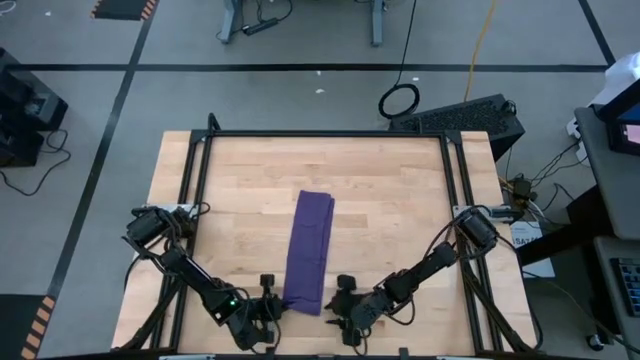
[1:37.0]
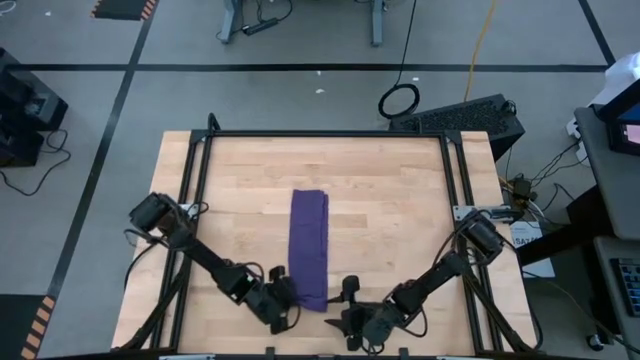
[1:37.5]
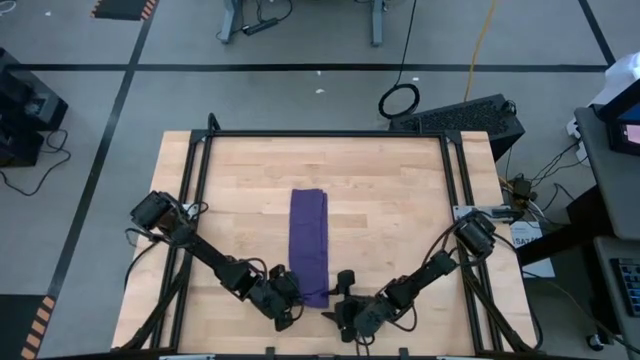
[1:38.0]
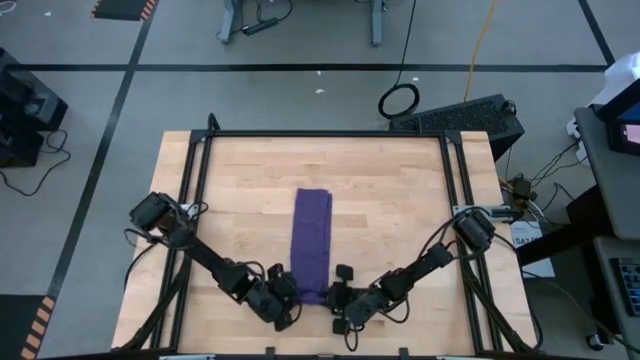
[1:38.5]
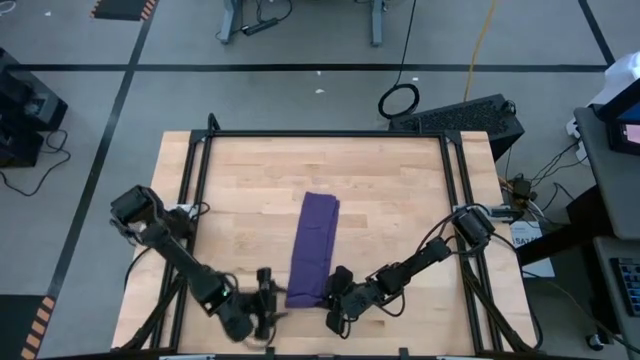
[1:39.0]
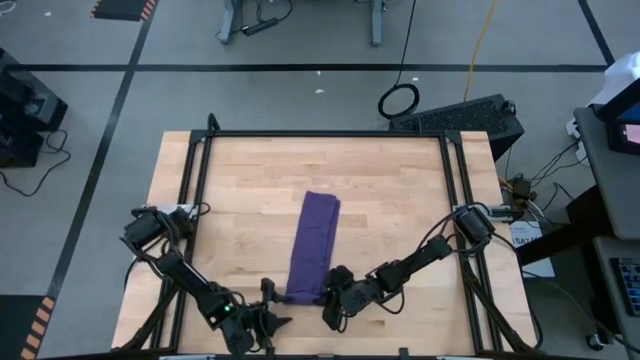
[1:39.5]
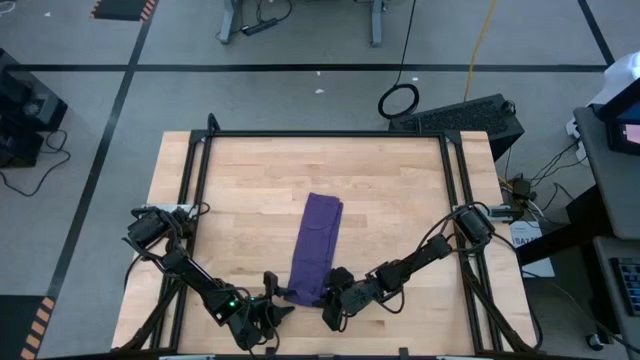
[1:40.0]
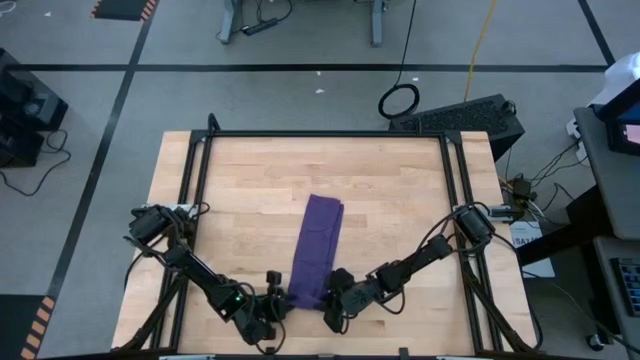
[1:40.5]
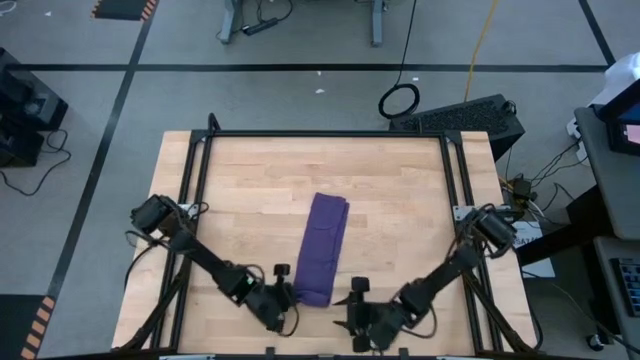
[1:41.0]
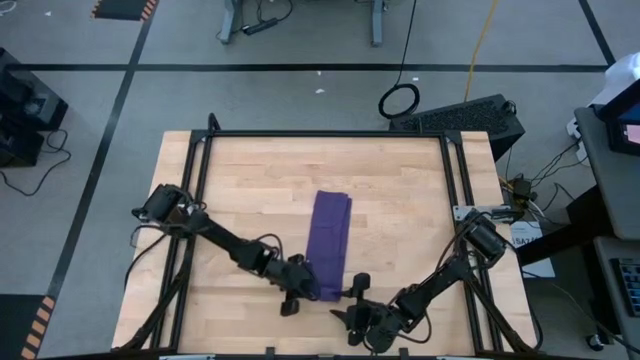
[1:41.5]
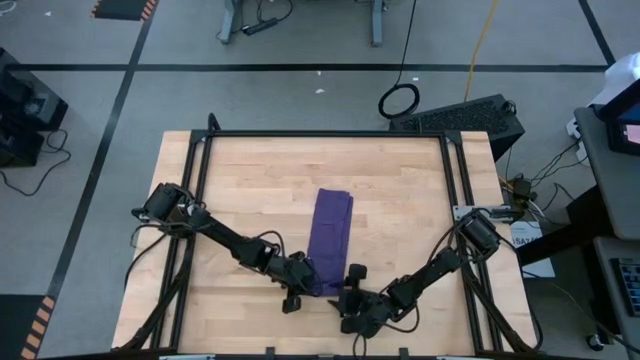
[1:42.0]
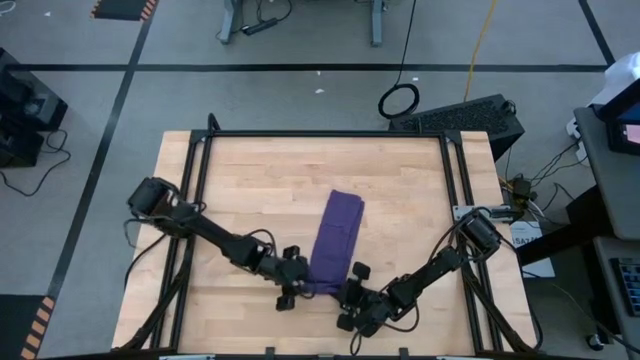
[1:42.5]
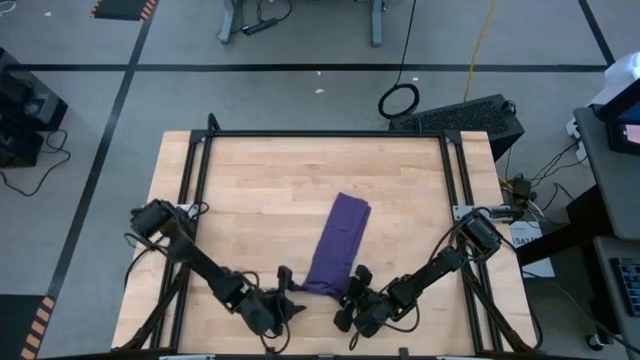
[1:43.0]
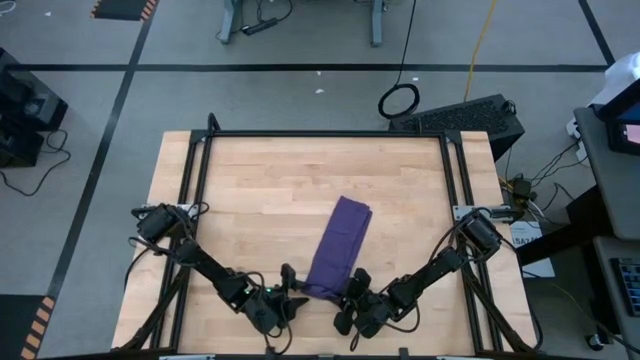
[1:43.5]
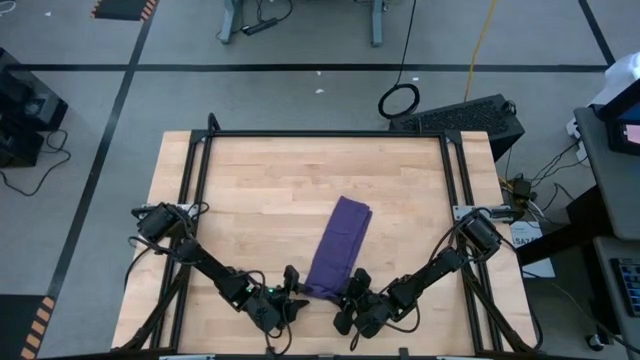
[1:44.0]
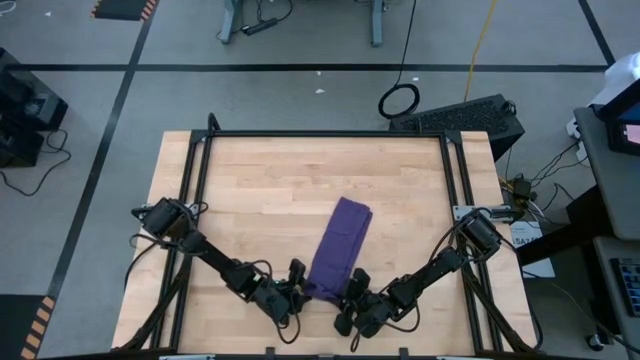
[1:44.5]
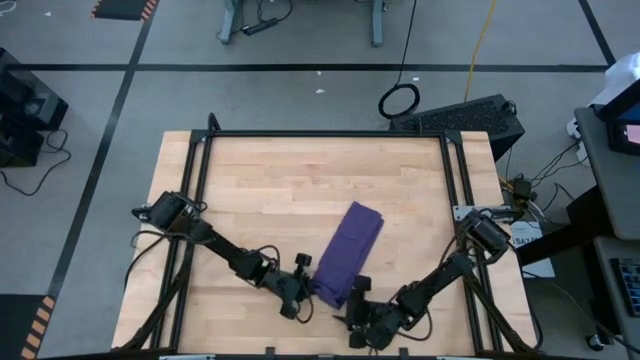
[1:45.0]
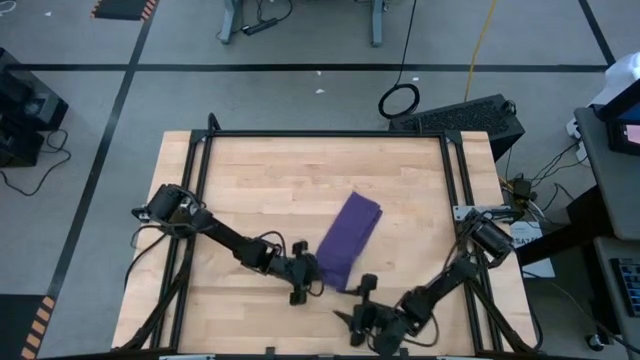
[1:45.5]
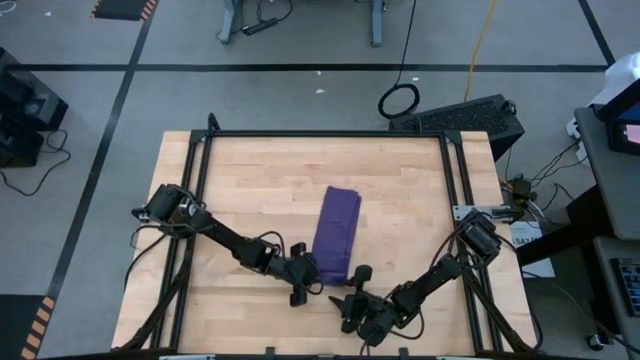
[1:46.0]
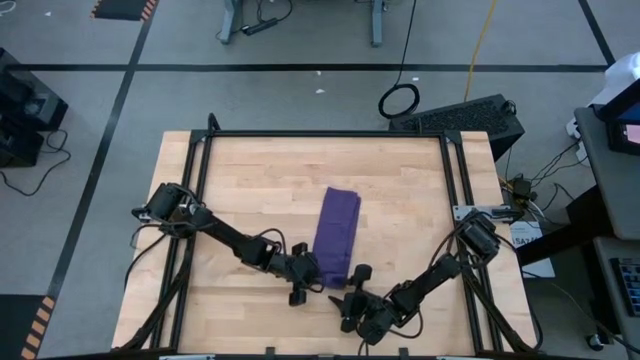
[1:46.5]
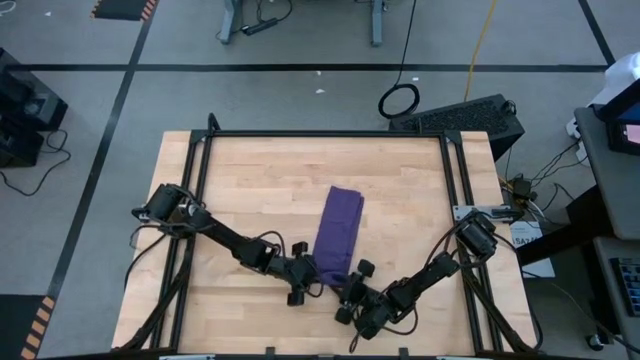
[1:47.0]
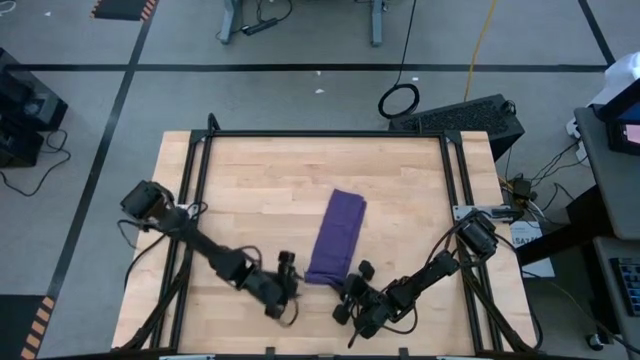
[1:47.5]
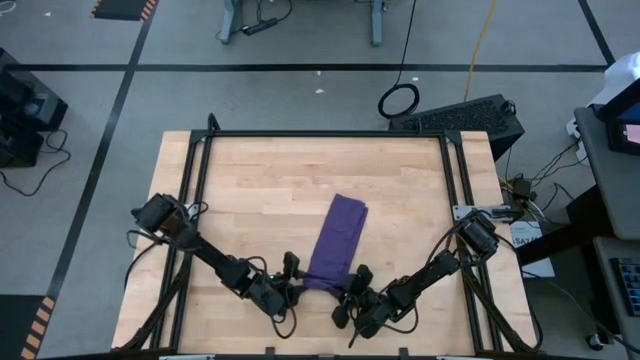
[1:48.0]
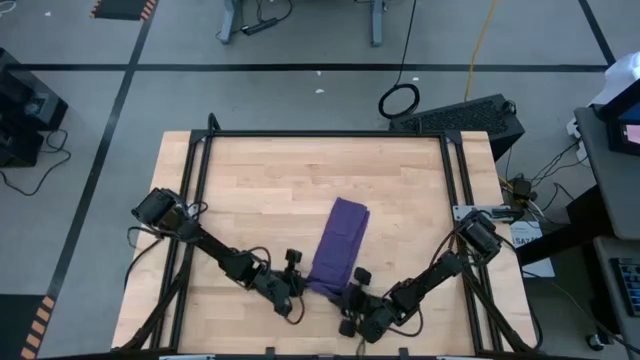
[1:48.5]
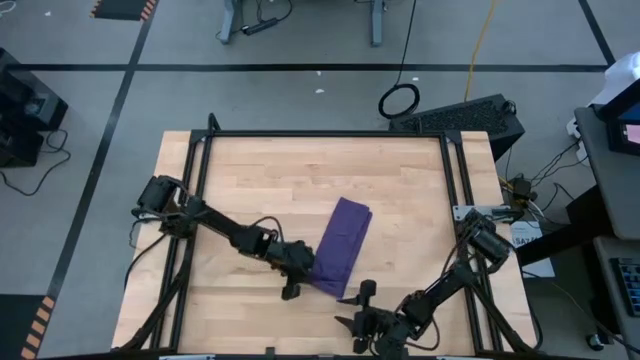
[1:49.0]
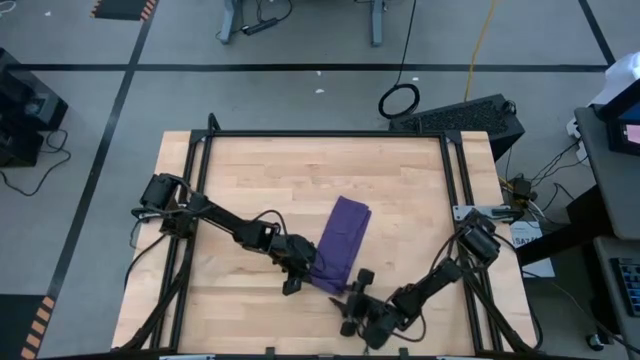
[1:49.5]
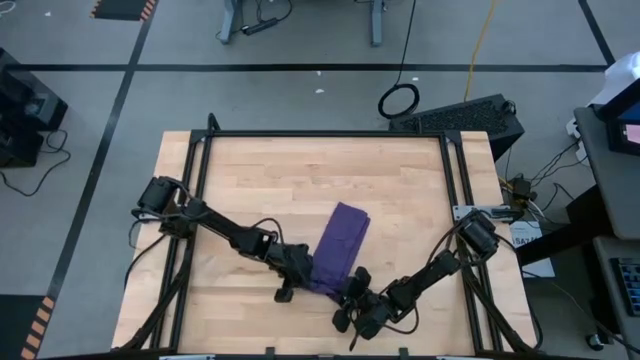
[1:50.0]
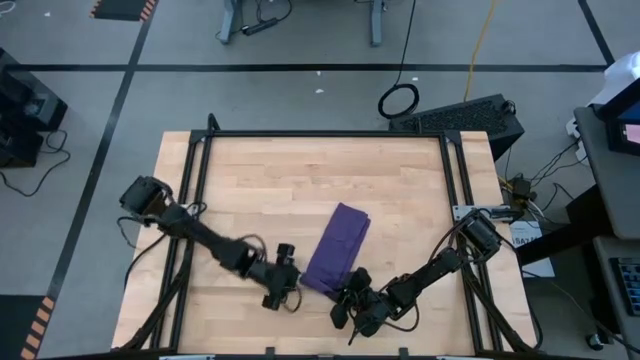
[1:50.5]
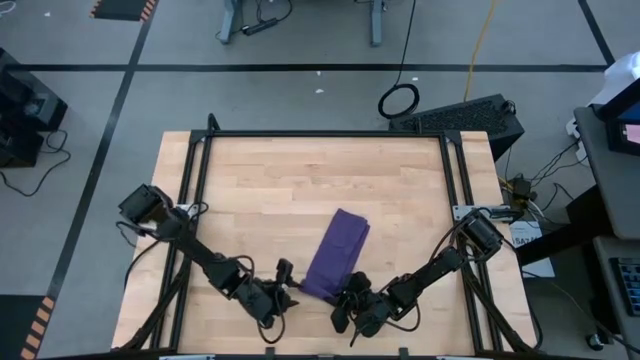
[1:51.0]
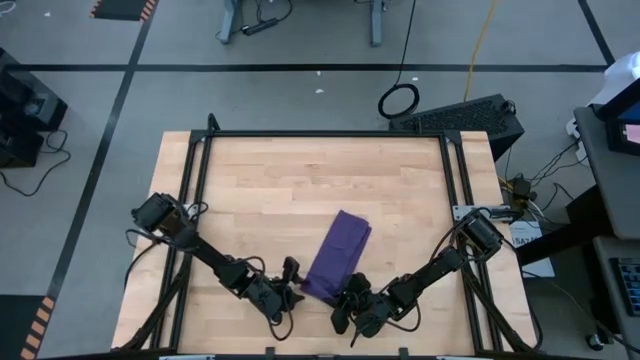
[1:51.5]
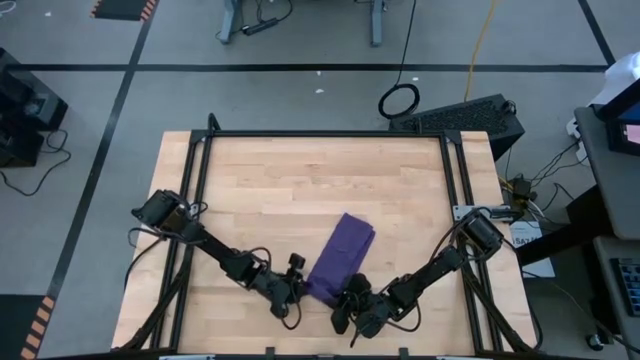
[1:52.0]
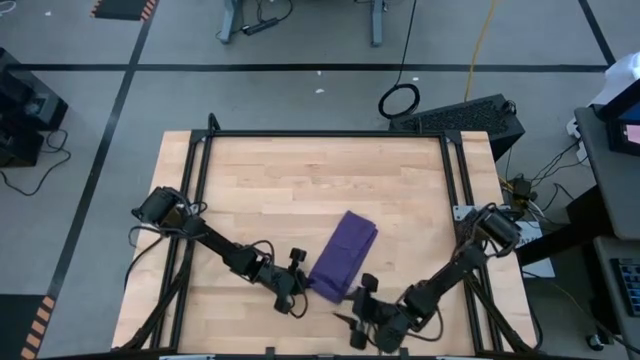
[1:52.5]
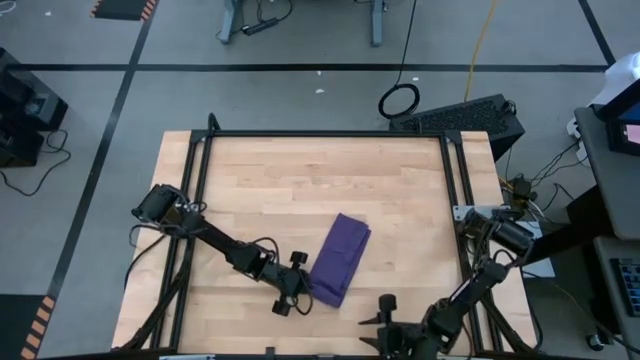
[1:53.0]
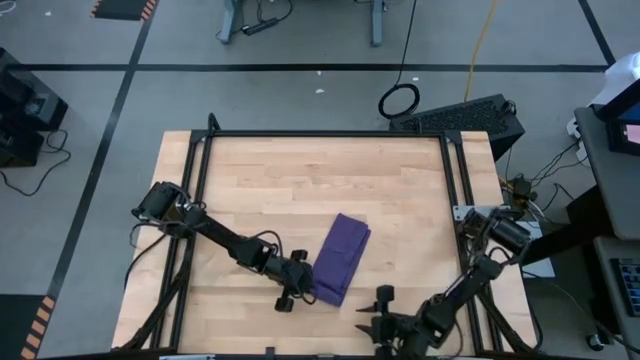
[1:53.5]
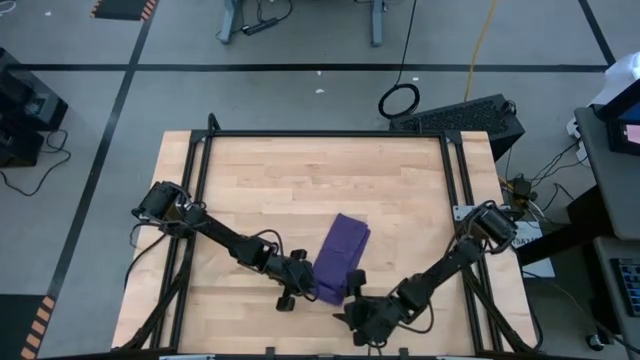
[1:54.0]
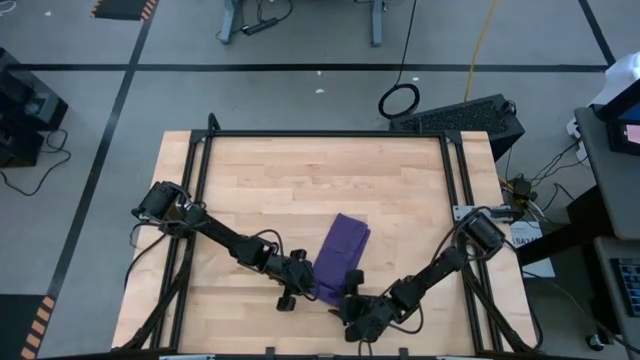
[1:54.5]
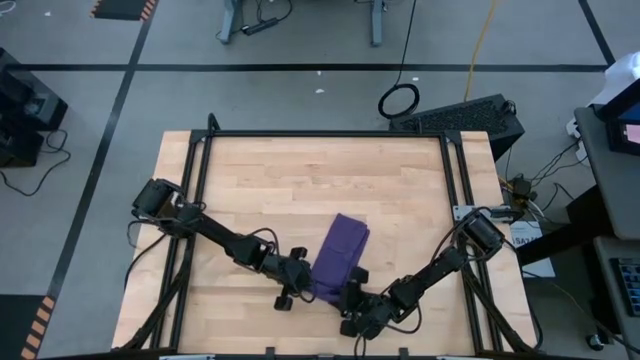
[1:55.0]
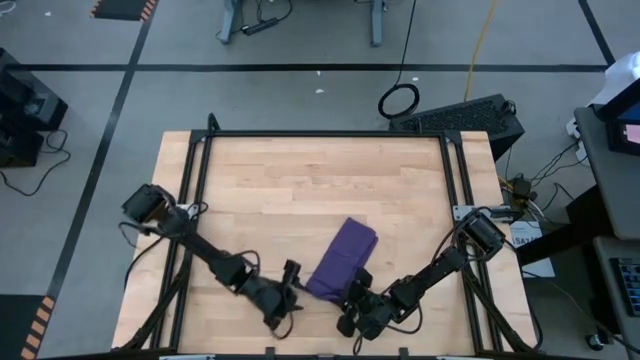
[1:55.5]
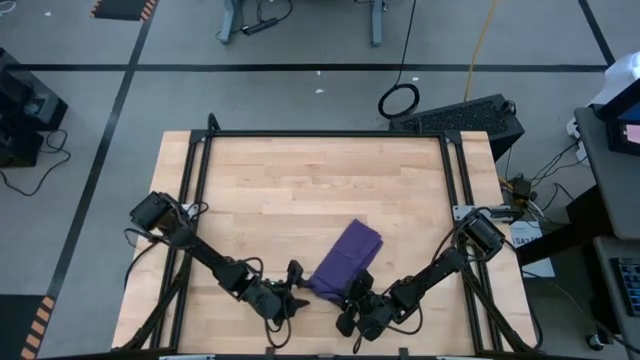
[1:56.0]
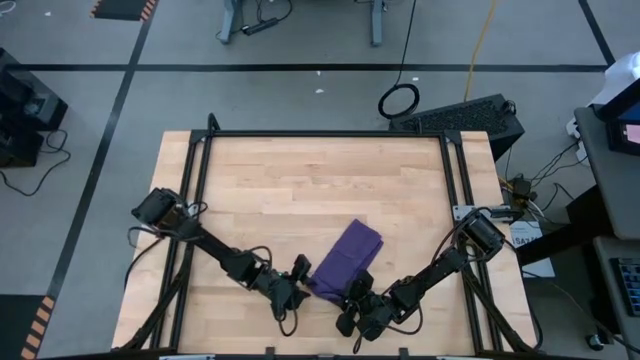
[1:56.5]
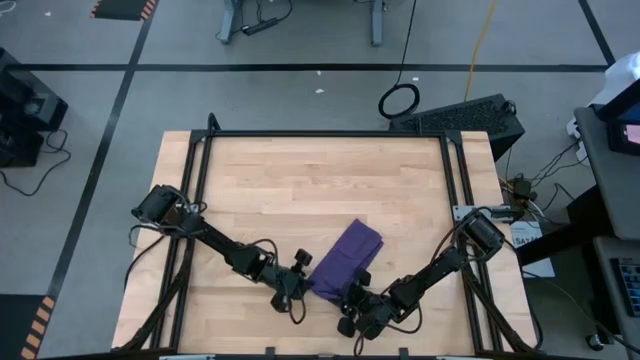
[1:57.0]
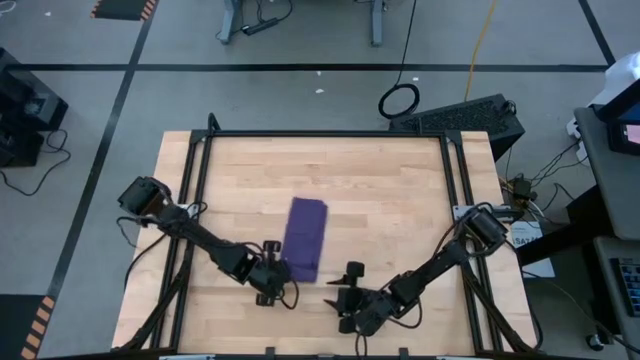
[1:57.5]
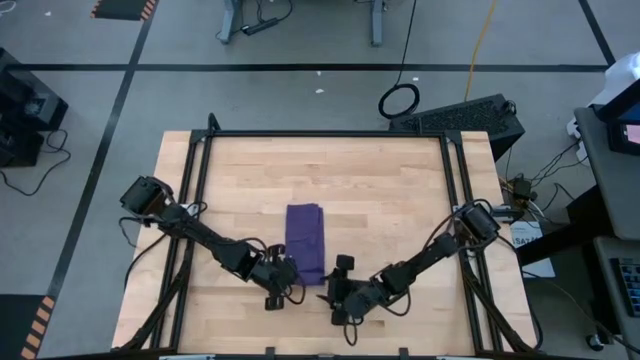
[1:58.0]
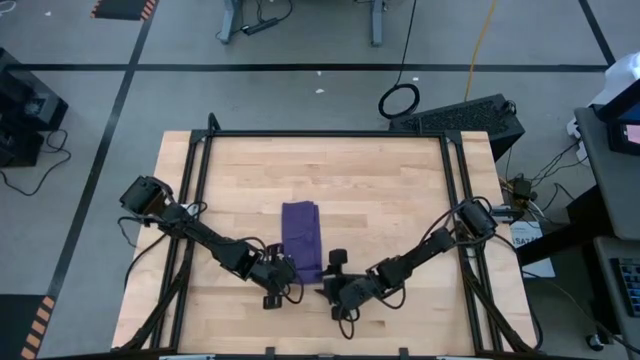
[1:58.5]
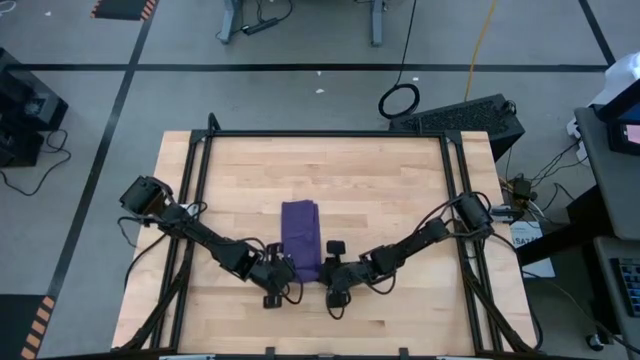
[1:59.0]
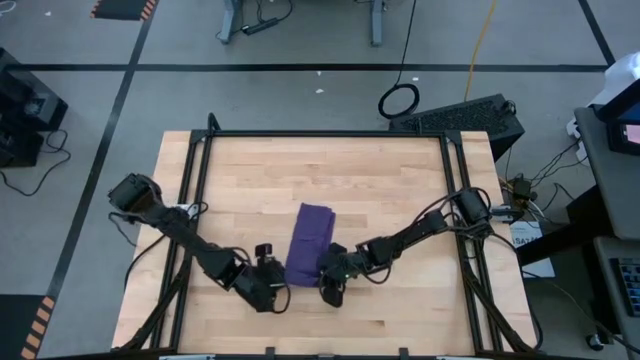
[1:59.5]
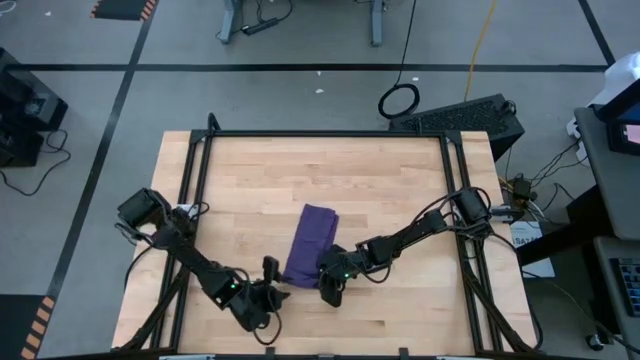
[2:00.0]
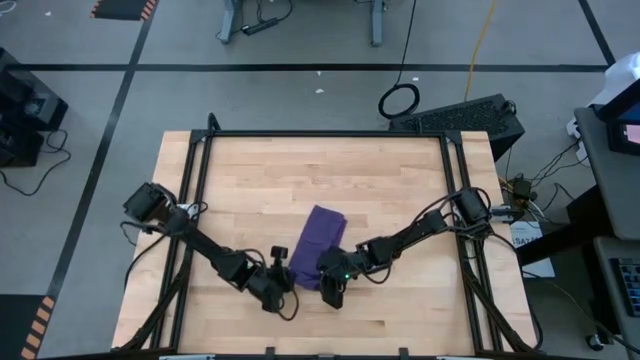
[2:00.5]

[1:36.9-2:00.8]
Task: Roll towel into tight, uniform cylinder
Roll the purple towel on the table
